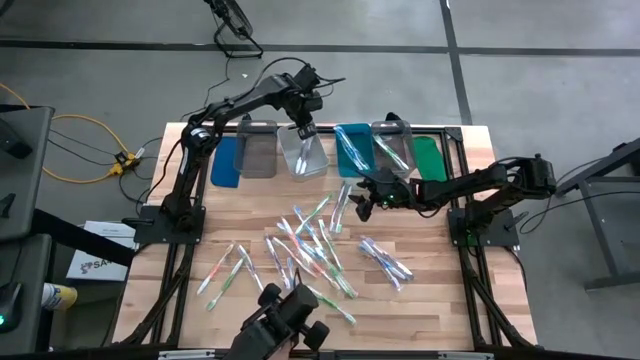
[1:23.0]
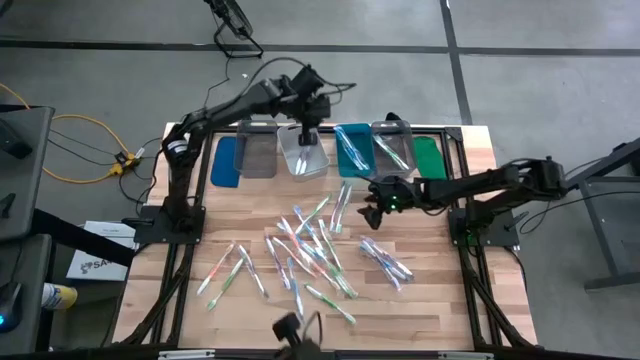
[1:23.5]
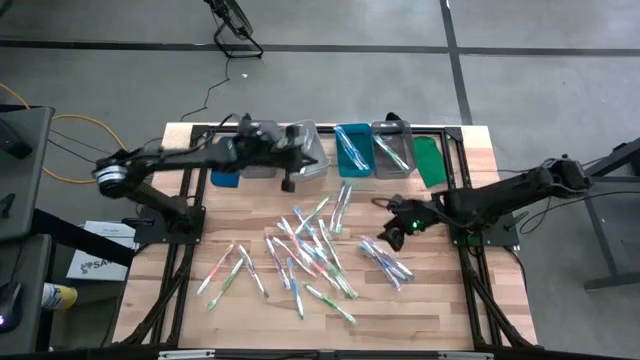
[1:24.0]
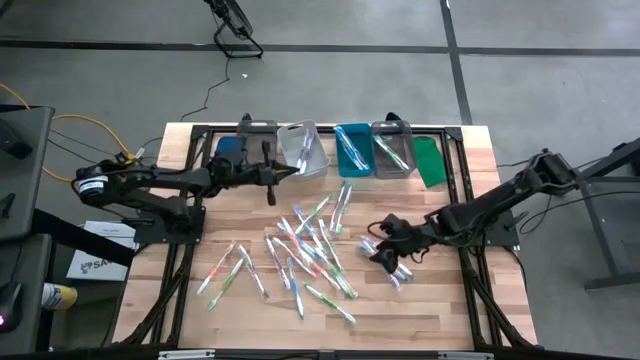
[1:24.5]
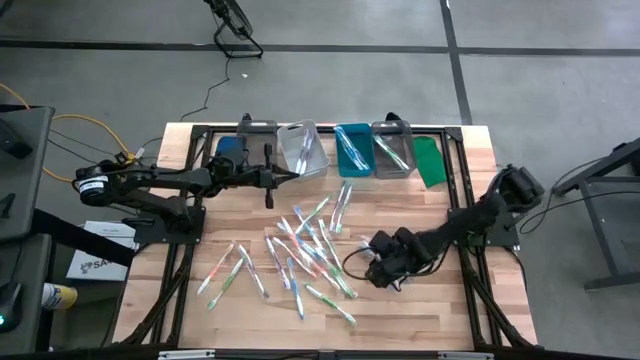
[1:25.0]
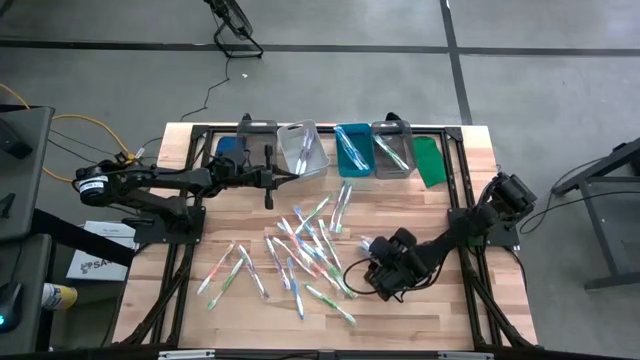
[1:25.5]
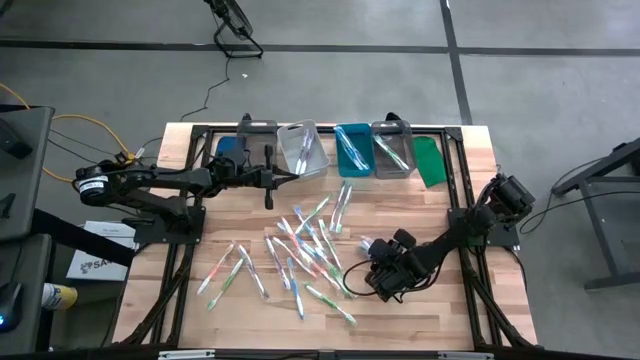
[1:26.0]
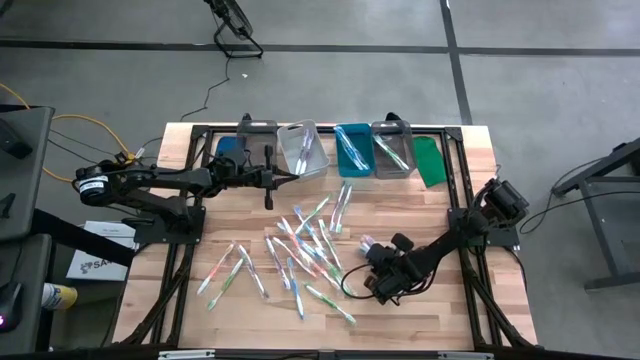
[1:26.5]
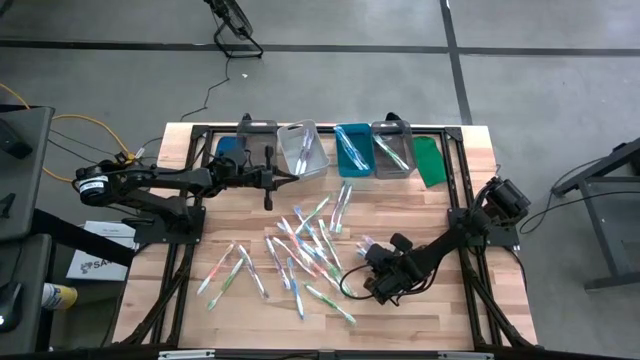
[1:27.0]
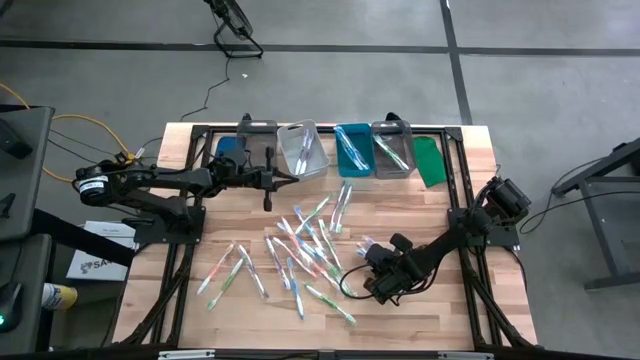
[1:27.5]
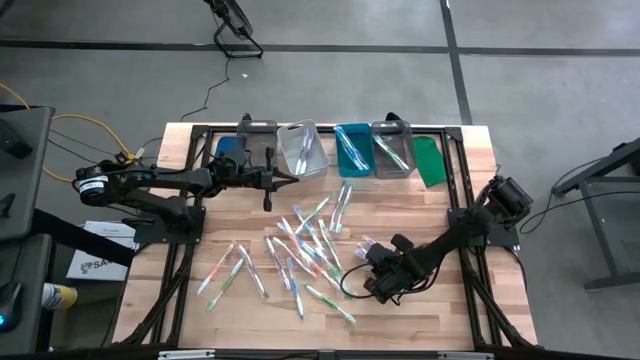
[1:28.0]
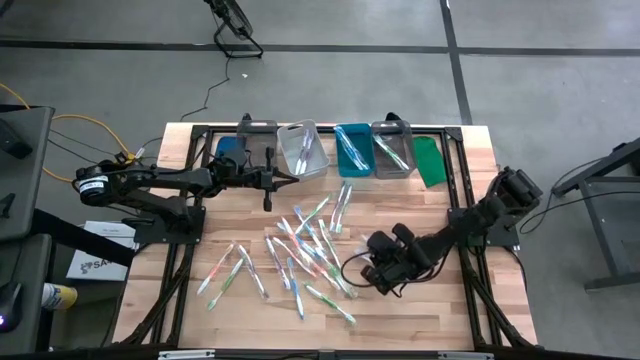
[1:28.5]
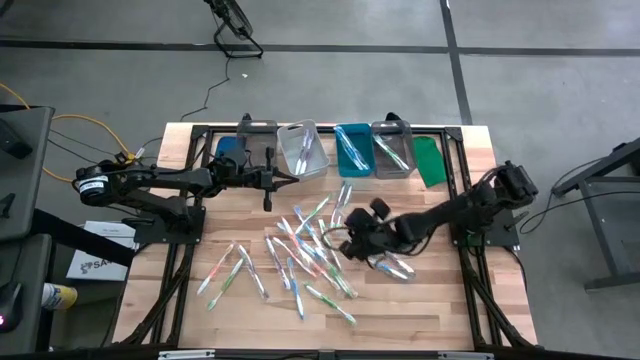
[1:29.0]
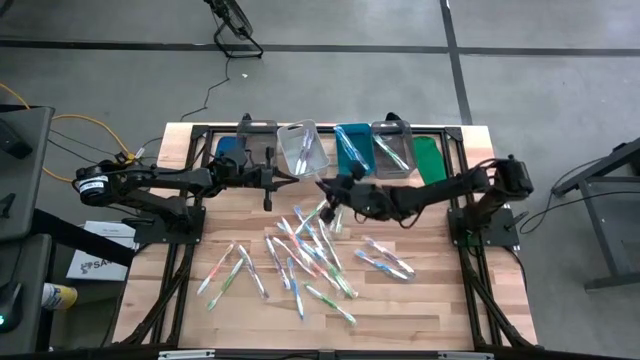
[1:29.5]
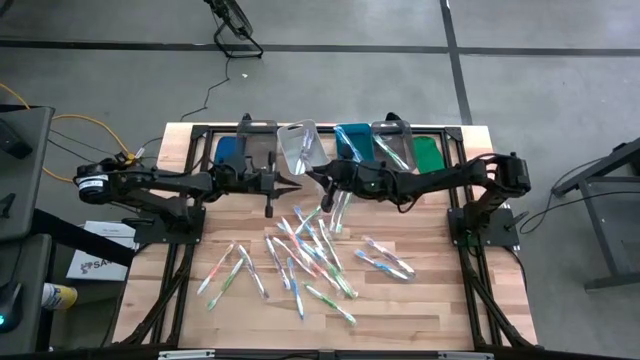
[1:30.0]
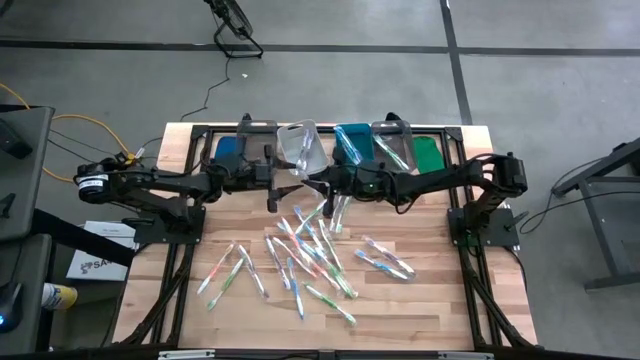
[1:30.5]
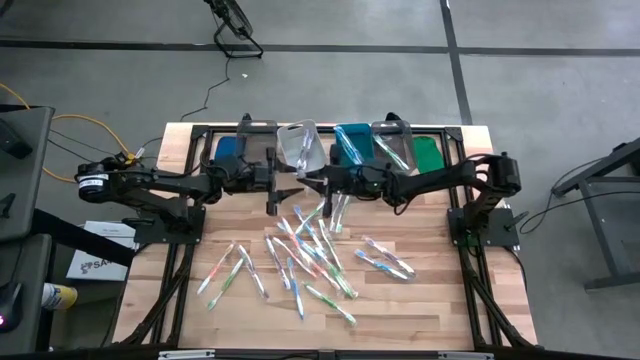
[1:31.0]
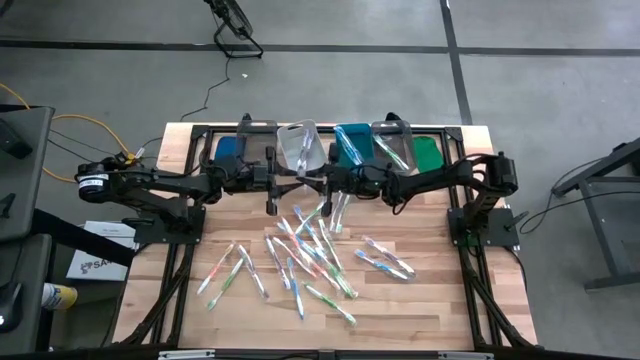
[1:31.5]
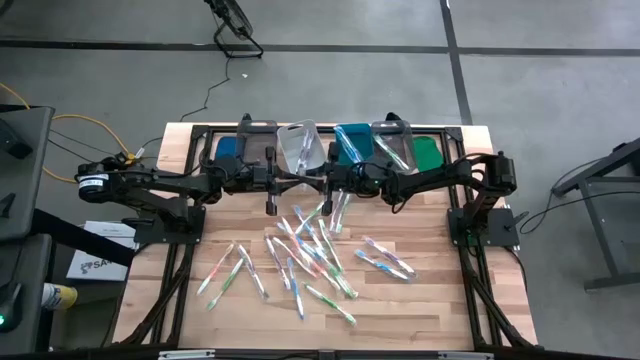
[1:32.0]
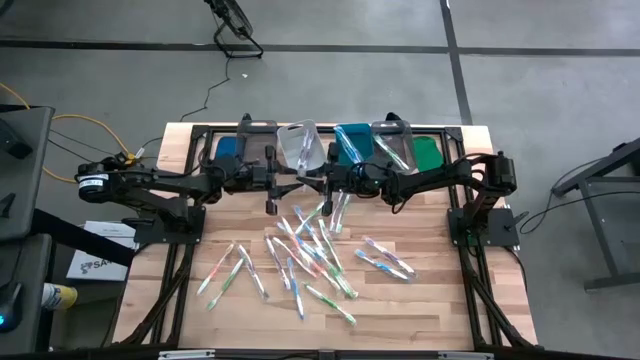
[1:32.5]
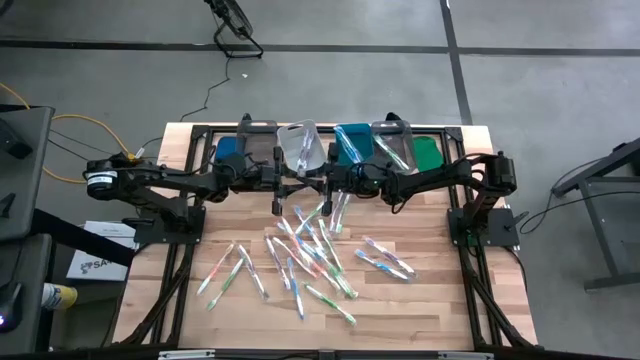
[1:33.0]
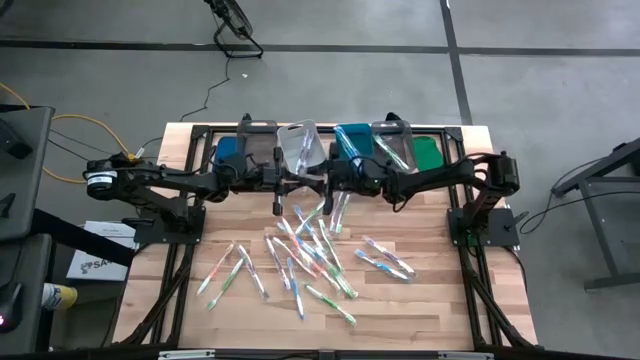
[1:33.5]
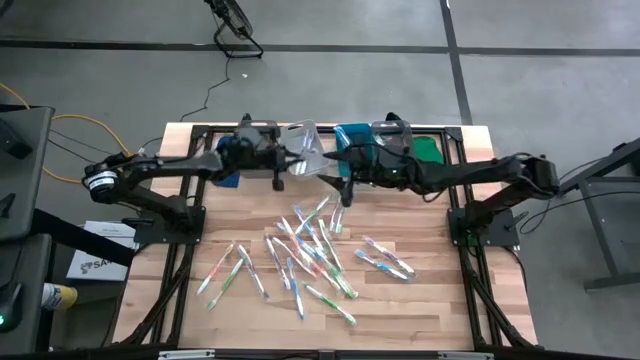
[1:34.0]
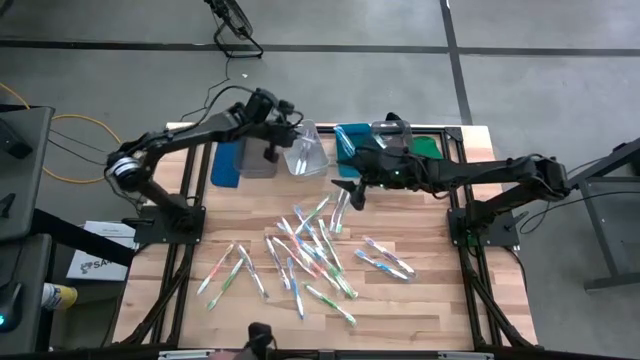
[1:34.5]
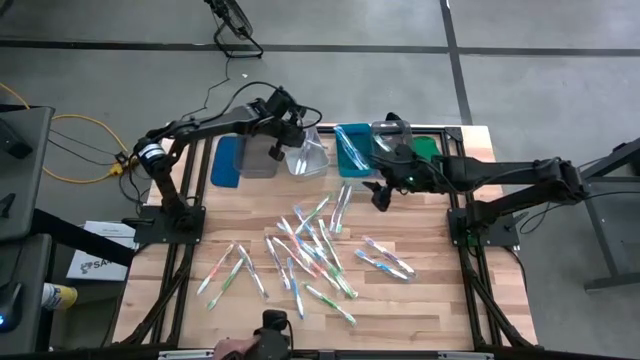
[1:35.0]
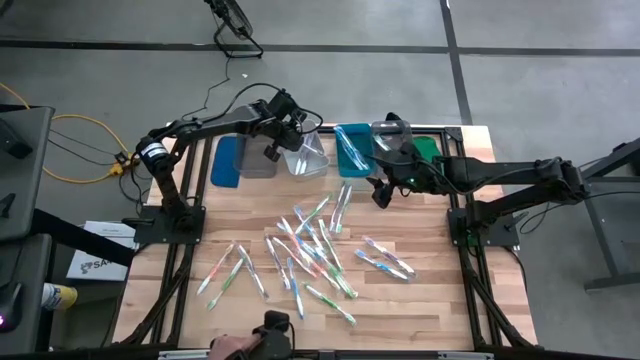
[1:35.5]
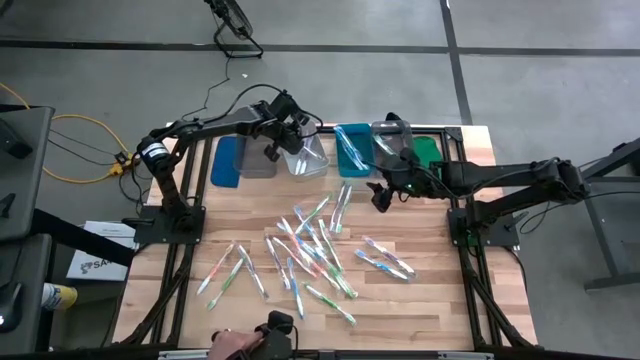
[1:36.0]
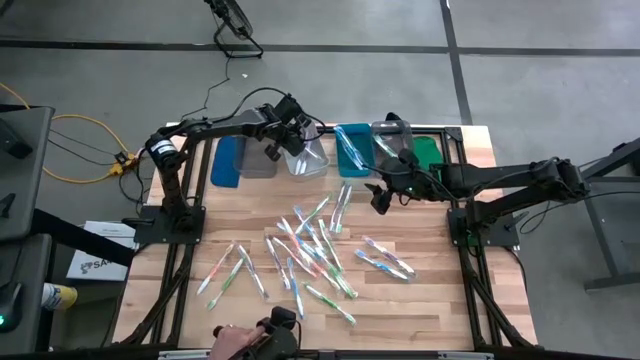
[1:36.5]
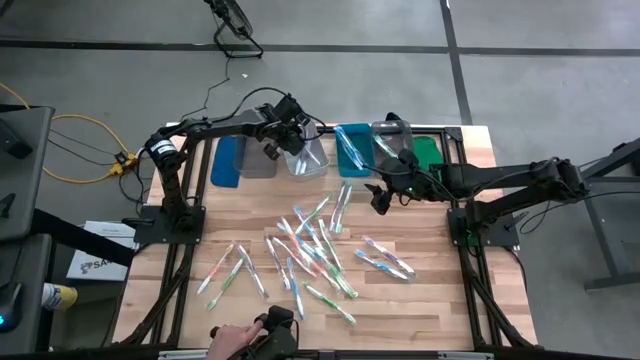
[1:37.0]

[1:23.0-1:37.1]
Task: Pick & Place Toothbrushes
Put the violet toothbrush into the gray bin

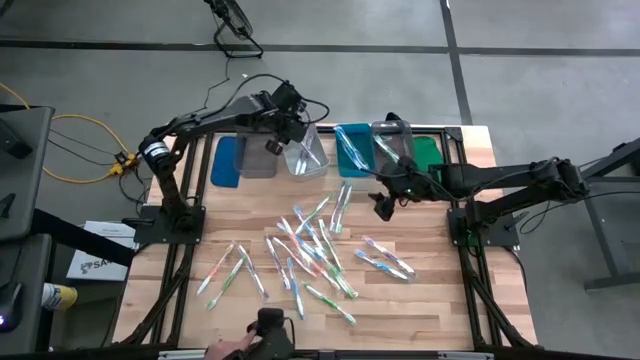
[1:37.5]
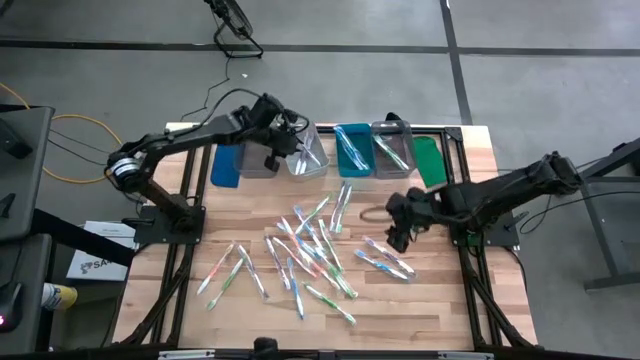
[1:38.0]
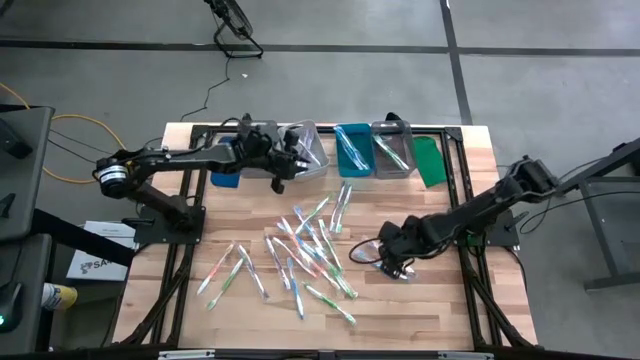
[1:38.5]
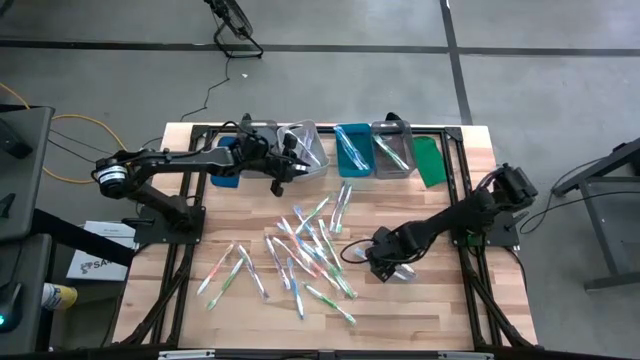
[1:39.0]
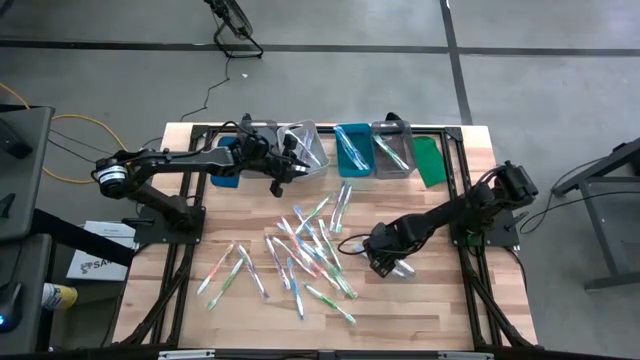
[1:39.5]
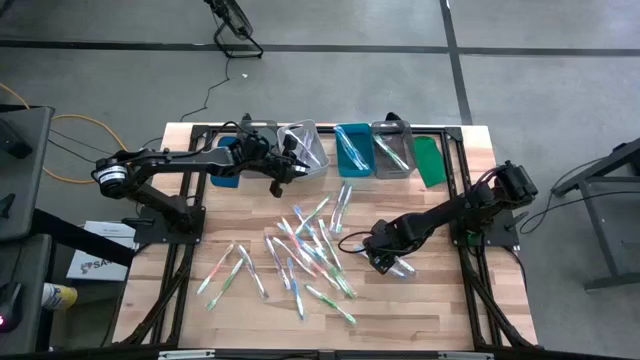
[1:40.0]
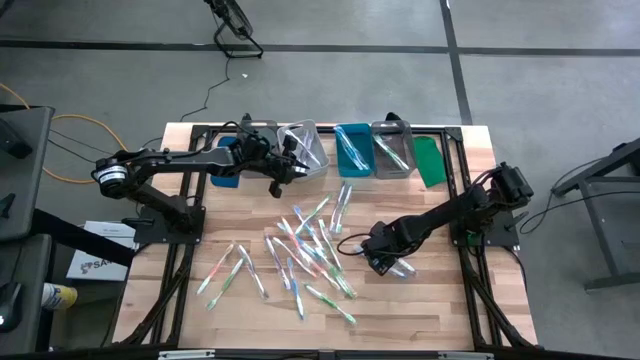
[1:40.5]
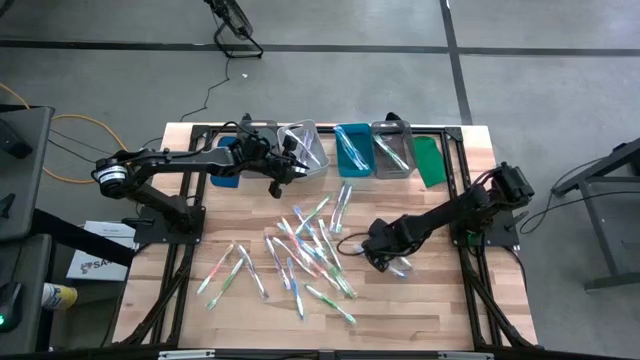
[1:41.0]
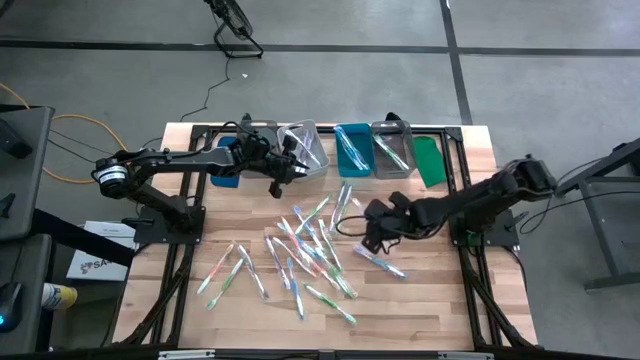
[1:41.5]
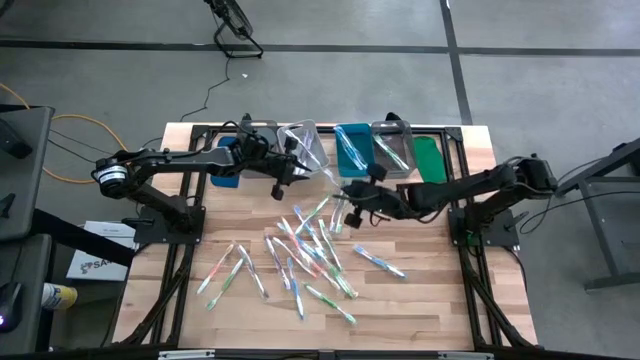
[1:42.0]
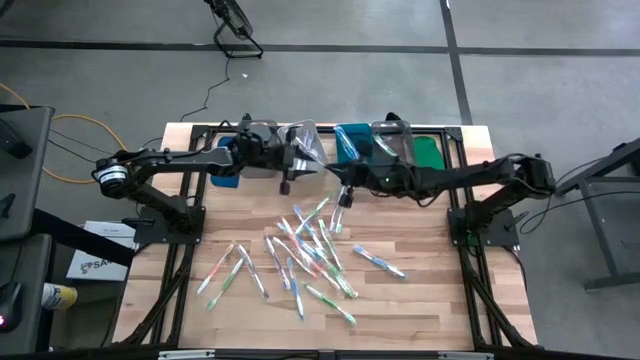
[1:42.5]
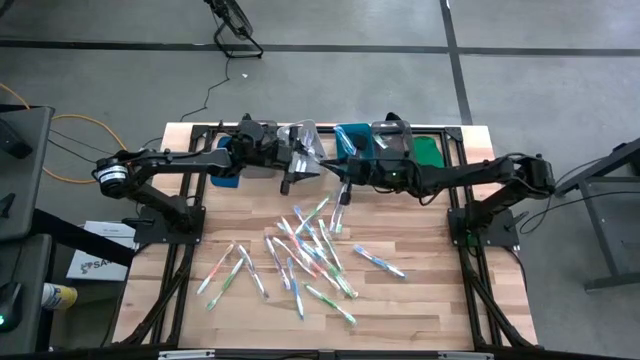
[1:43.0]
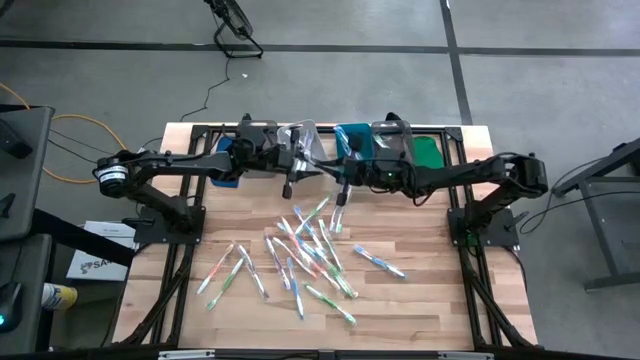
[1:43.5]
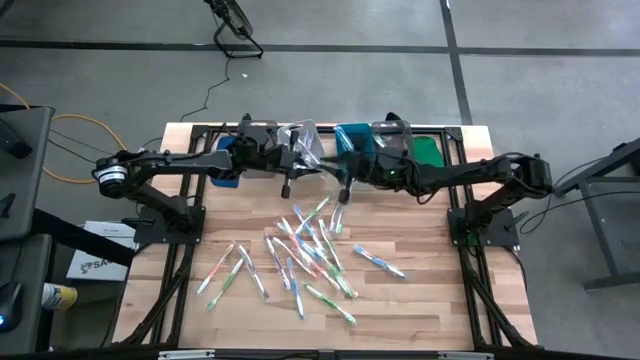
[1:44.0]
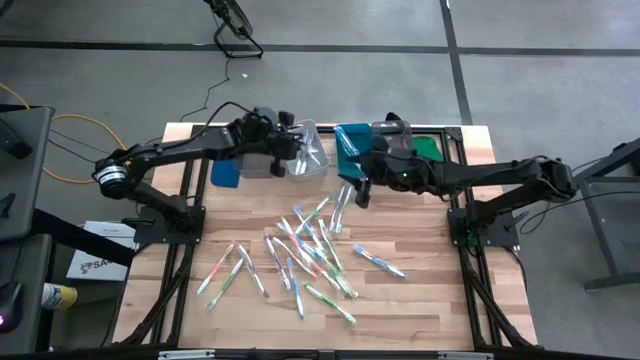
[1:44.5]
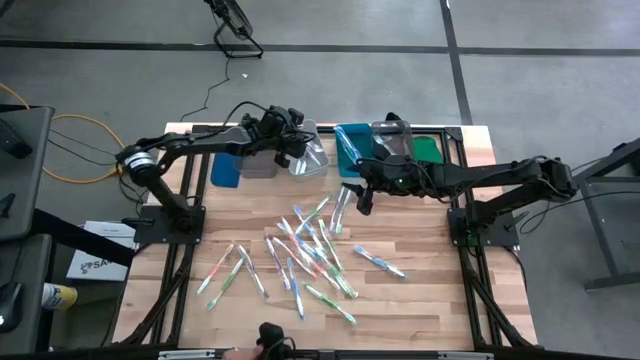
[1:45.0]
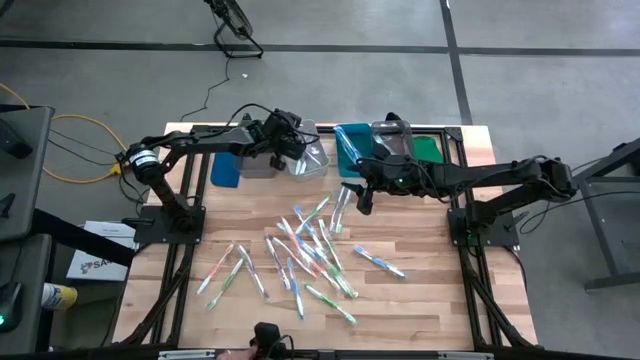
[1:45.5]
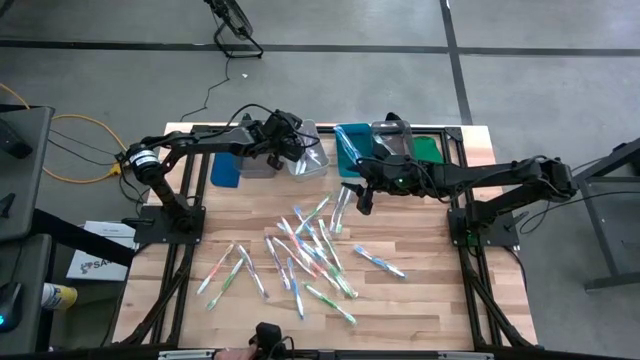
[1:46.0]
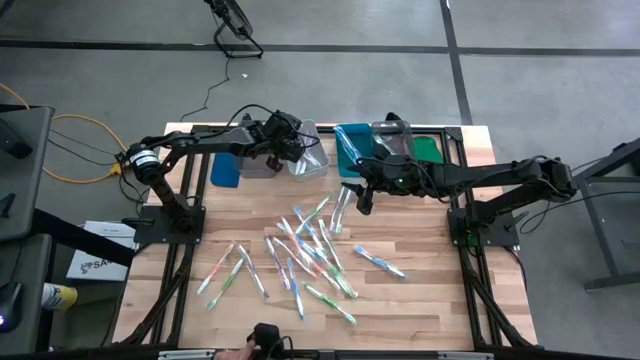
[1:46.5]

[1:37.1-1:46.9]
Put the violet toothbrush into the gray bin
